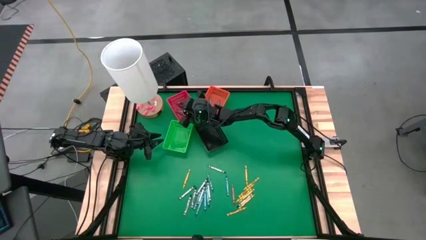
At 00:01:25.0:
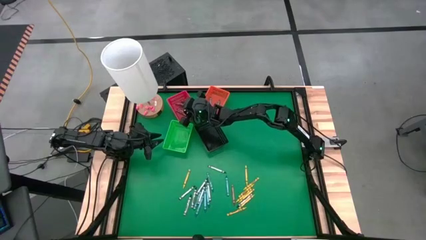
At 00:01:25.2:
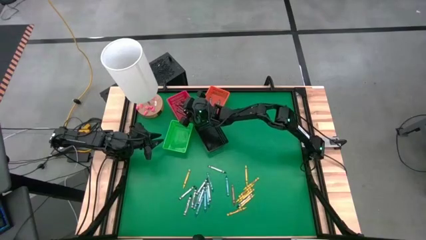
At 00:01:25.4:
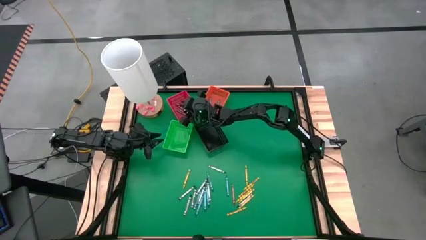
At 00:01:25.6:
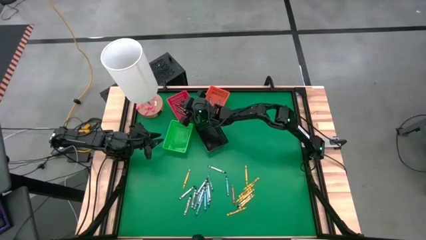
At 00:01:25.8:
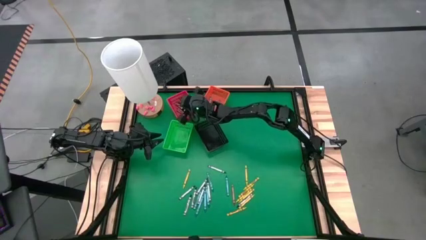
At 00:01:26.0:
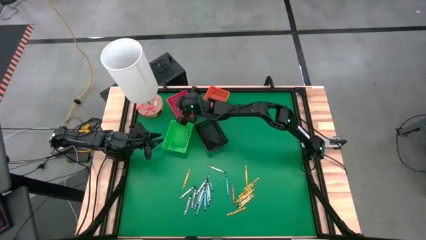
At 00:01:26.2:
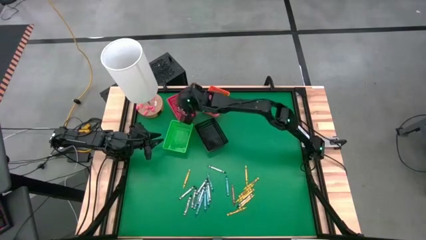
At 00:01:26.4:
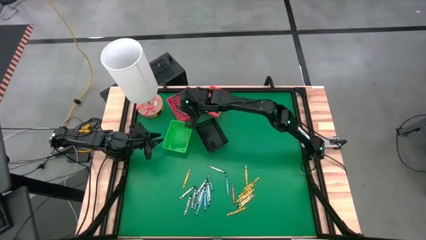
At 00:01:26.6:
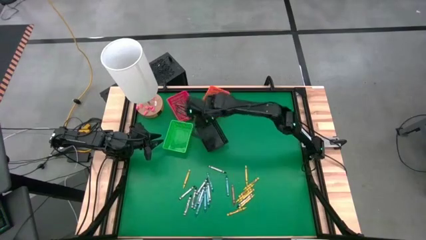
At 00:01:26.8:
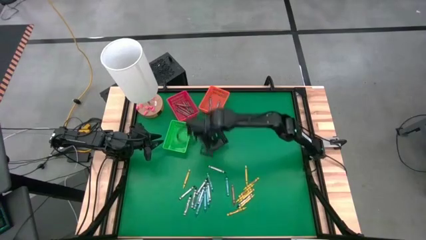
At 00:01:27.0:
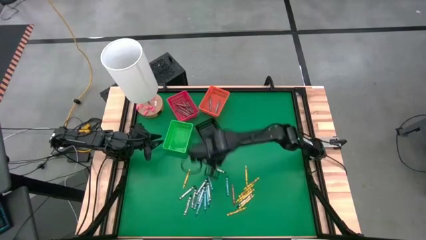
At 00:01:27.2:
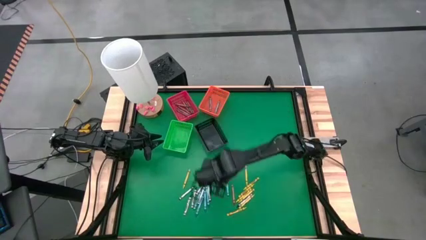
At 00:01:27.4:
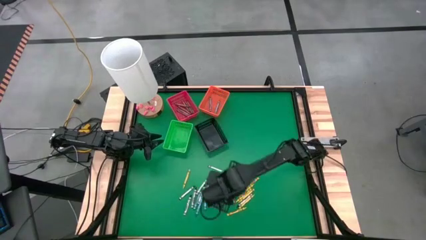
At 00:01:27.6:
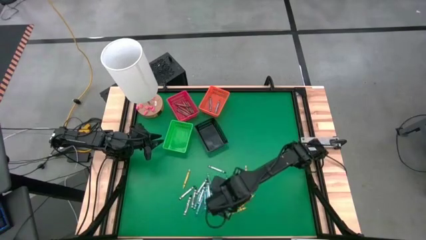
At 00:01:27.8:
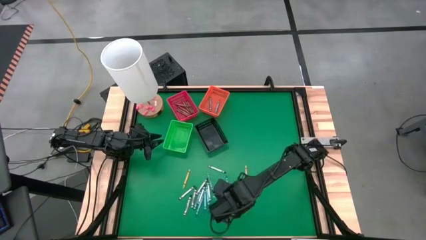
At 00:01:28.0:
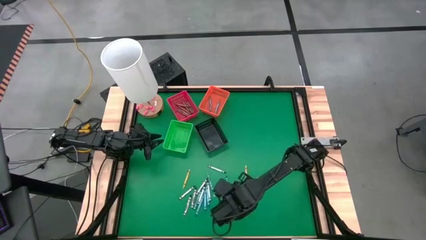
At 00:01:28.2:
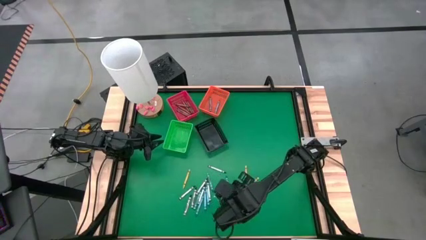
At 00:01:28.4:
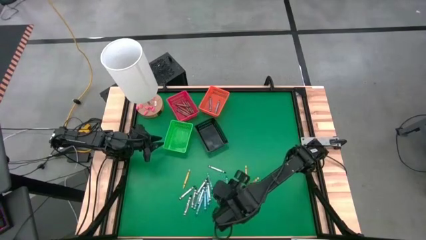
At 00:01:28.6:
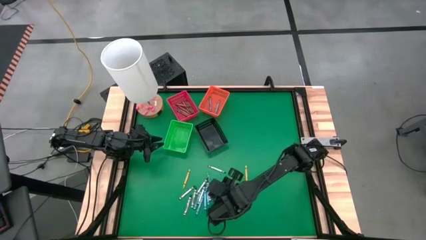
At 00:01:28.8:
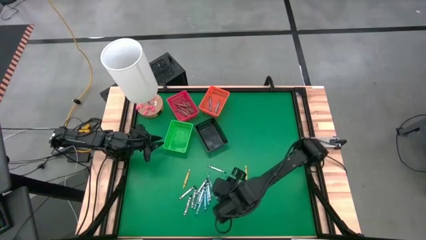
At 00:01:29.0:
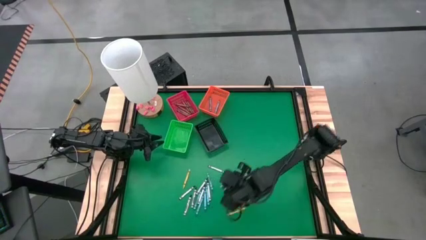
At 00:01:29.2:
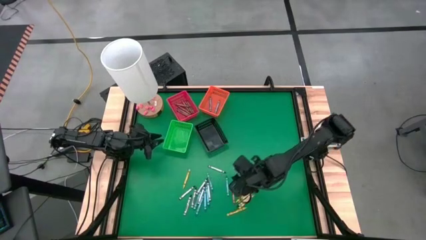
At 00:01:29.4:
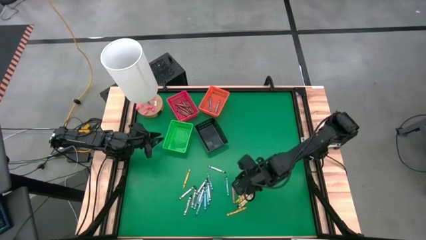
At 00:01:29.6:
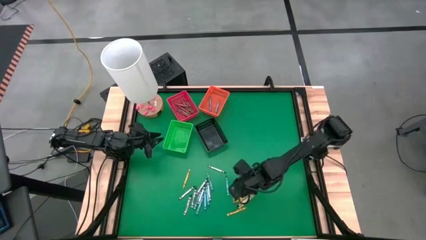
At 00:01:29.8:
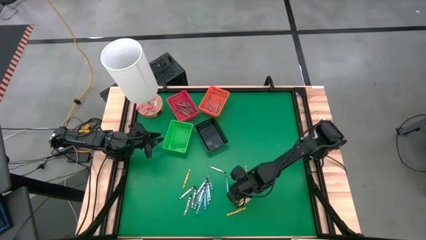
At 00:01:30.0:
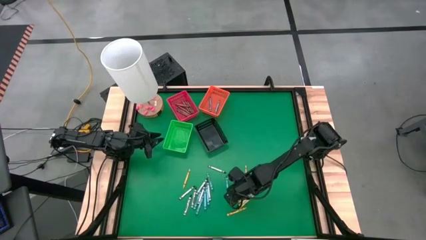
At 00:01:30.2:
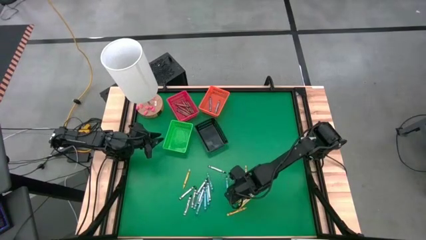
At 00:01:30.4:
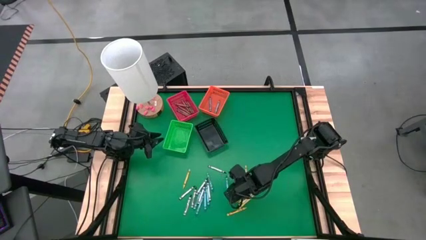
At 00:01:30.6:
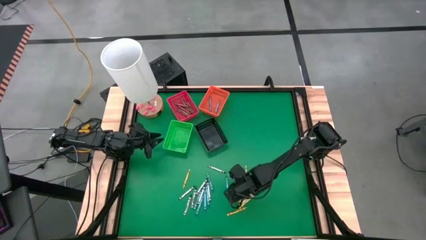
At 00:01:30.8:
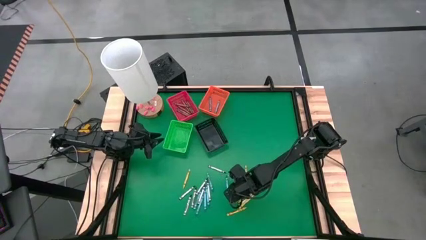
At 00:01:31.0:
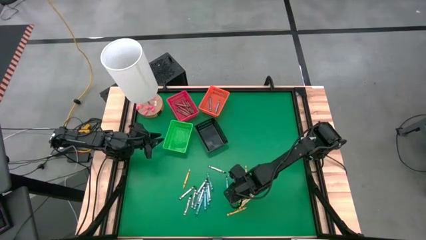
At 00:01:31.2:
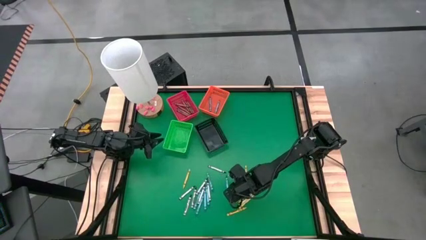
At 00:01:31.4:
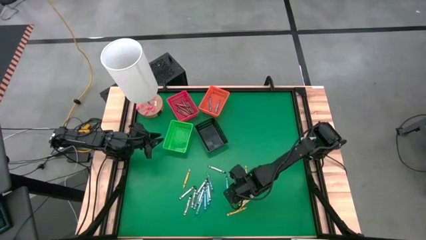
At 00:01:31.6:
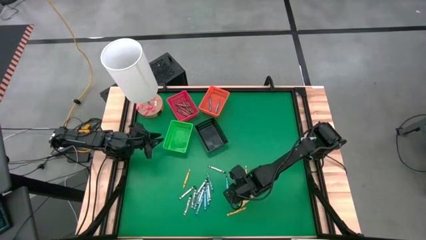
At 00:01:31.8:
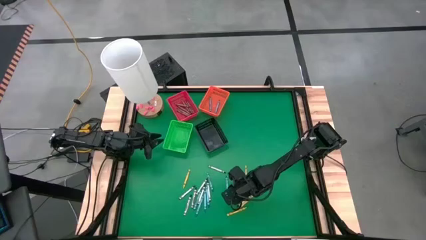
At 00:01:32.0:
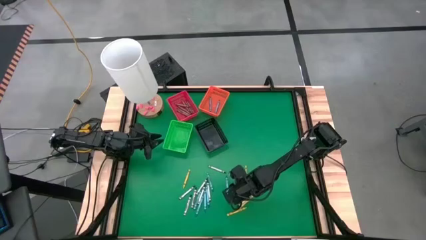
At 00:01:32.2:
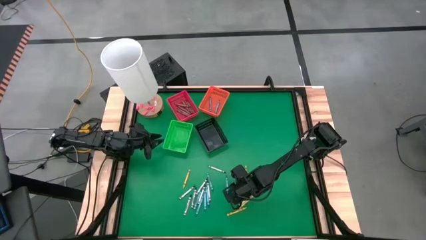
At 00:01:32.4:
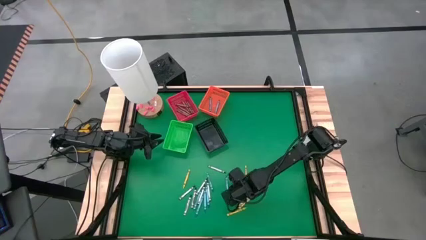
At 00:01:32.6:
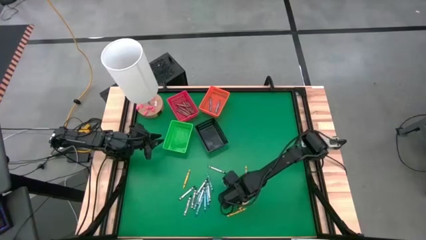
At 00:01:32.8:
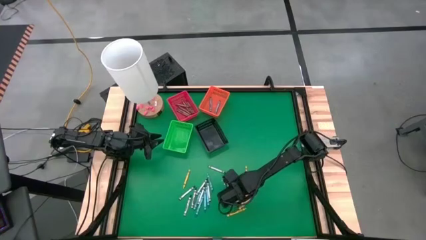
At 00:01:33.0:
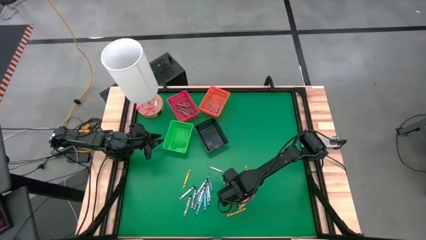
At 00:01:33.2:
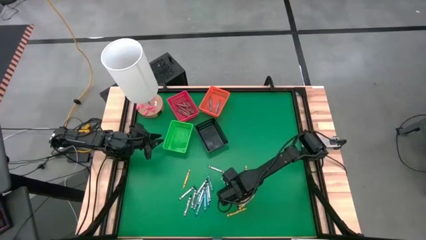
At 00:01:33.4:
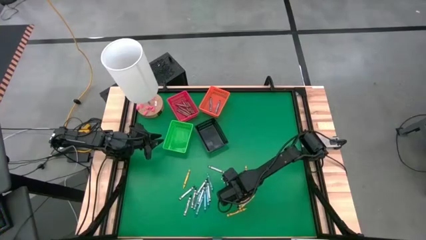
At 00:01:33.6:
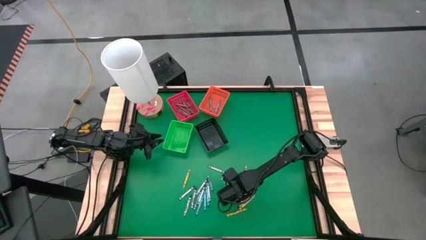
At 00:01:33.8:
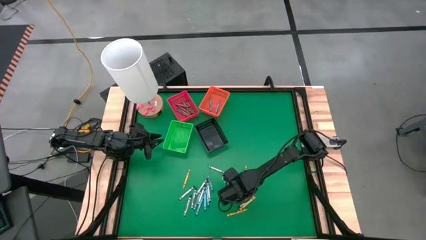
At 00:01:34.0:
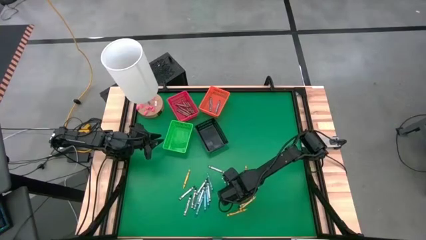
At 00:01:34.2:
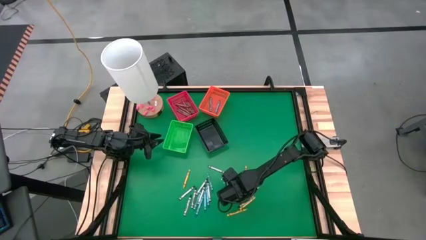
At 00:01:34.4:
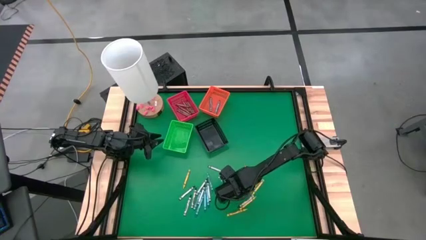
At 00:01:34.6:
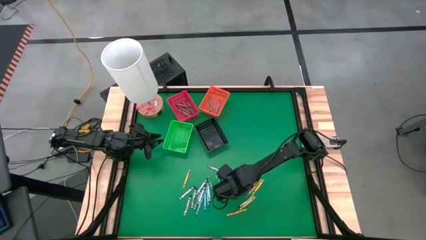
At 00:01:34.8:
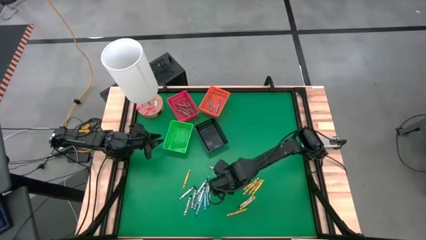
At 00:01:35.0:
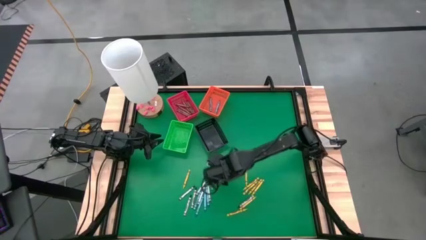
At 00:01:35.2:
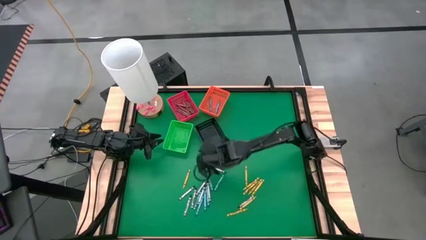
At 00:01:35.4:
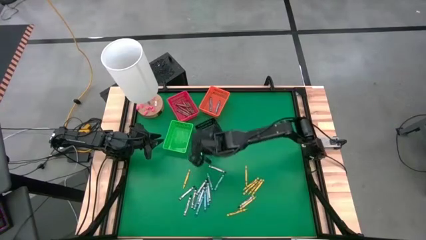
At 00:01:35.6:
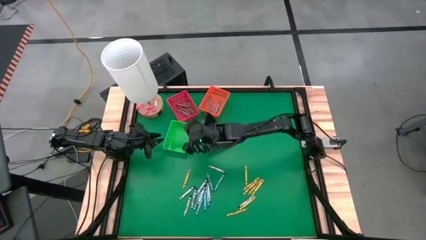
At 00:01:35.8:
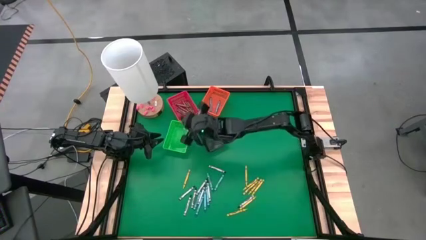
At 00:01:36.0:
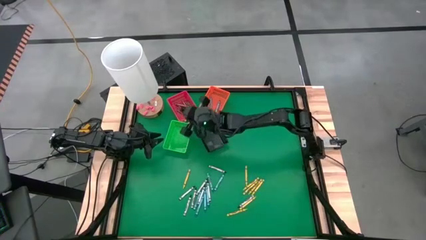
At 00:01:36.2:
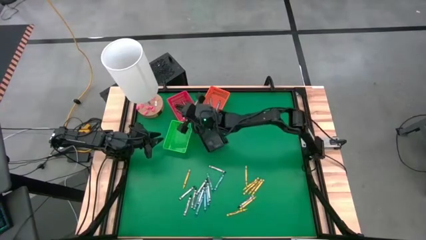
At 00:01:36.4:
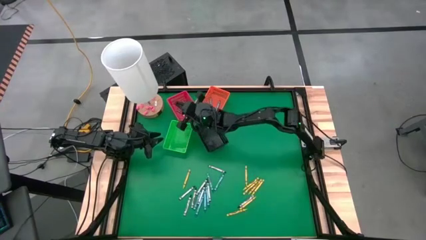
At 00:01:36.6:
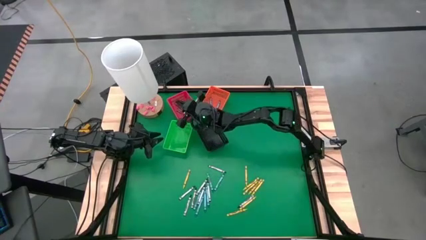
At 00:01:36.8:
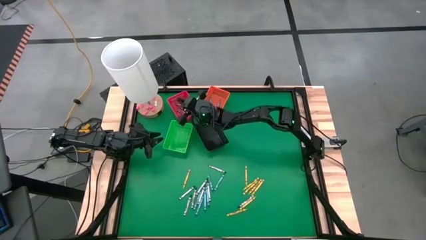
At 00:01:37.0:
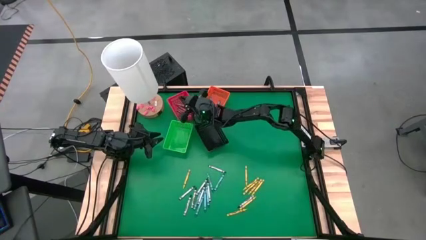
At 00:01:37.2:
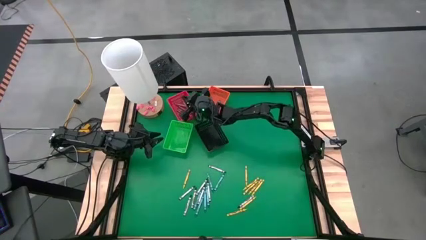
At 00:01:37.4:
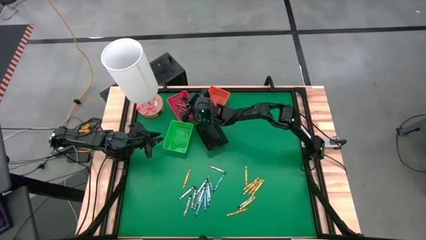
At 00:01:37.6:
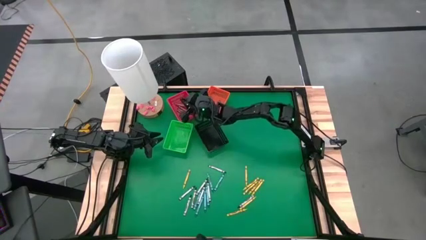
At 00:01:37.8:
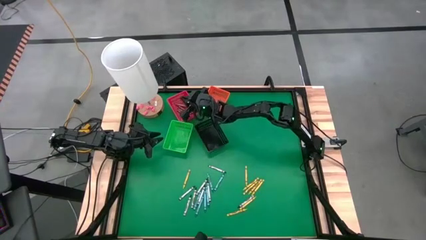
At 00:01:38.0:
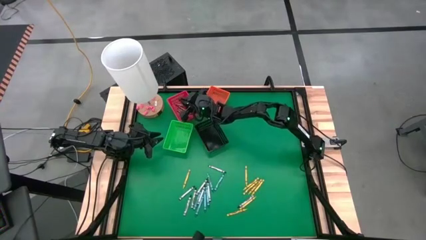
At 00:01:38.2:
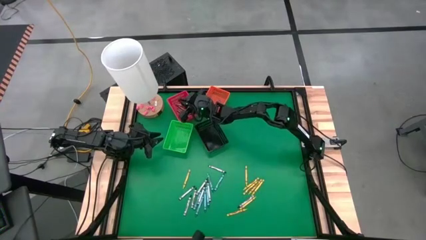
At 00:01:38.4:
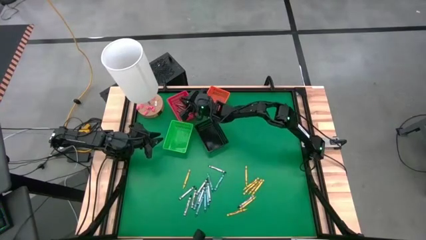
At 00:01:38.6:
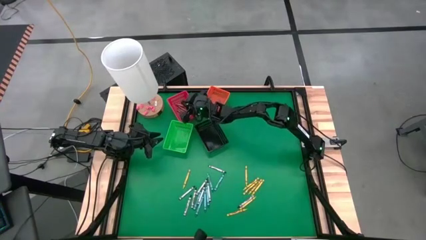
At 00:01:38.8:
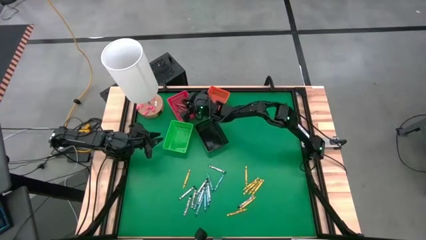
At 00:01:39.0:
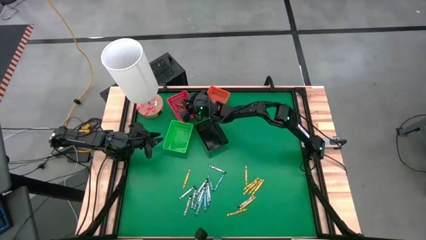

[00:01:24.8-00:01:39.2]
Task: Sort crayons
Put the brown crayon into the red bin
